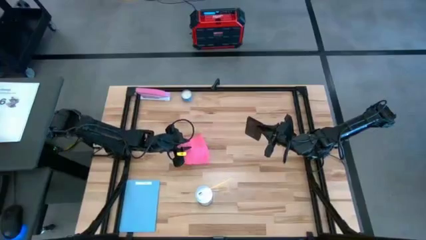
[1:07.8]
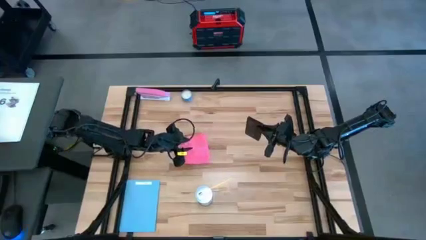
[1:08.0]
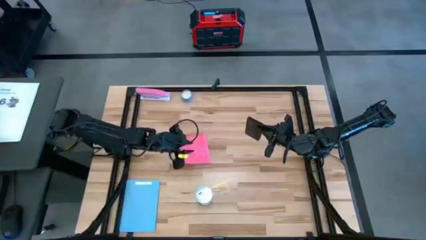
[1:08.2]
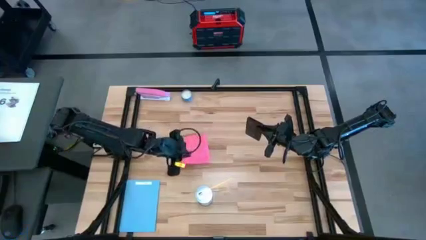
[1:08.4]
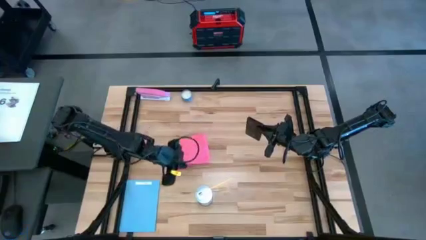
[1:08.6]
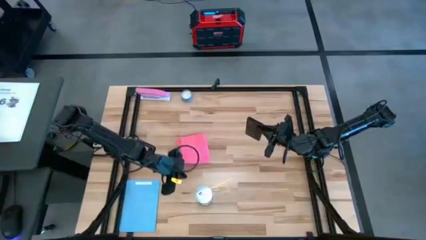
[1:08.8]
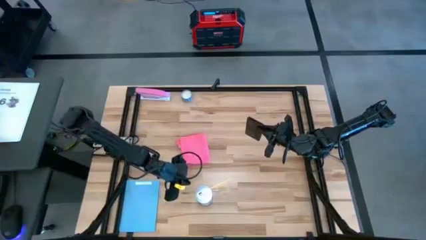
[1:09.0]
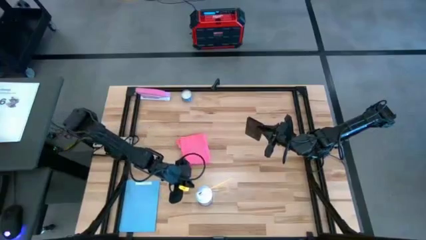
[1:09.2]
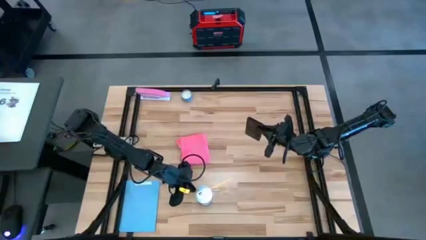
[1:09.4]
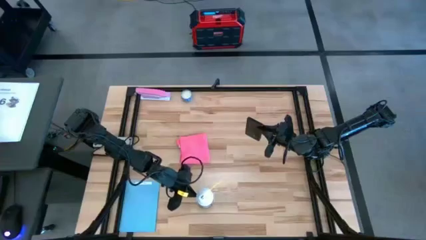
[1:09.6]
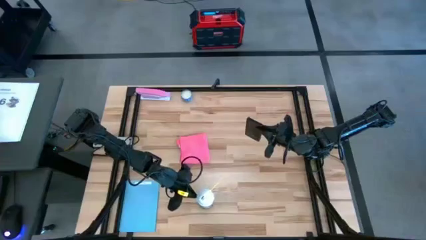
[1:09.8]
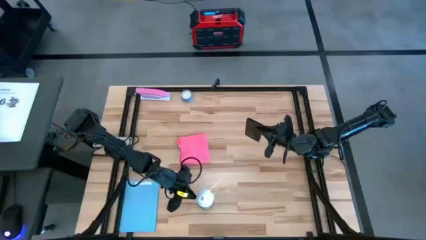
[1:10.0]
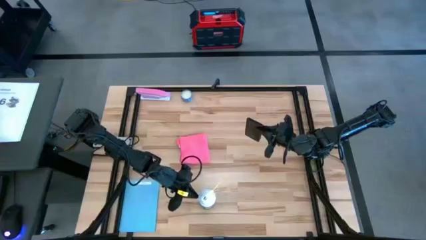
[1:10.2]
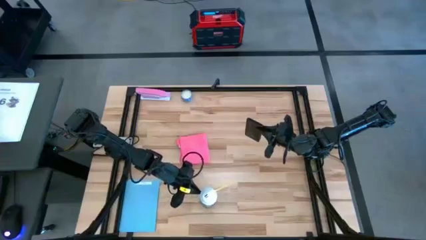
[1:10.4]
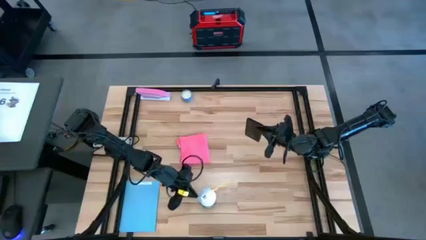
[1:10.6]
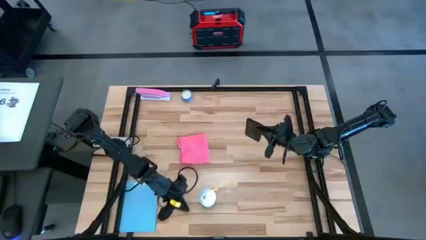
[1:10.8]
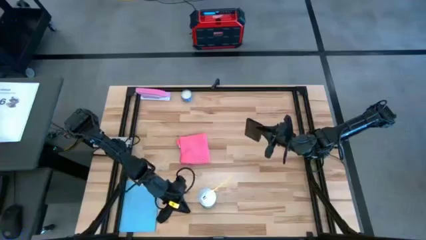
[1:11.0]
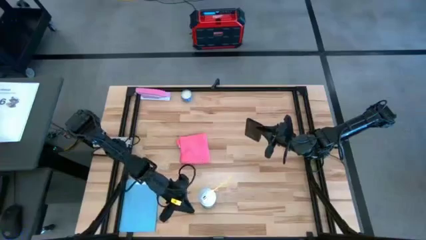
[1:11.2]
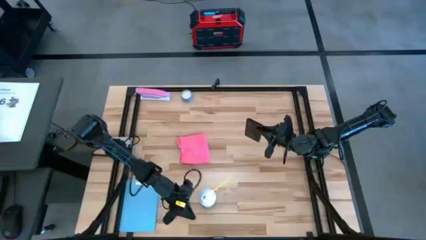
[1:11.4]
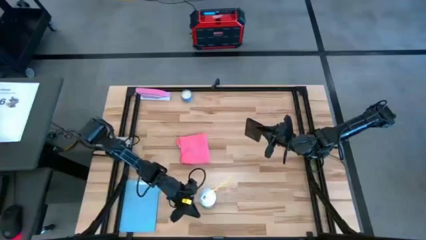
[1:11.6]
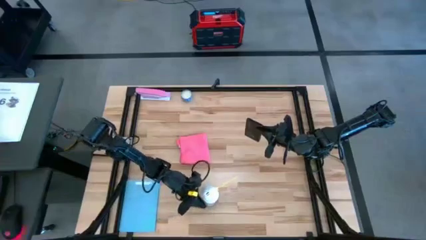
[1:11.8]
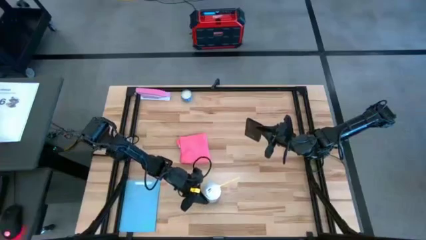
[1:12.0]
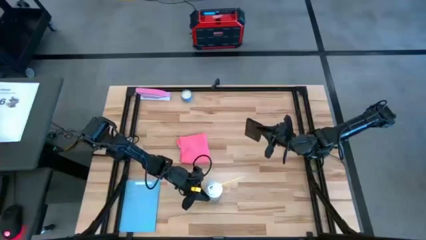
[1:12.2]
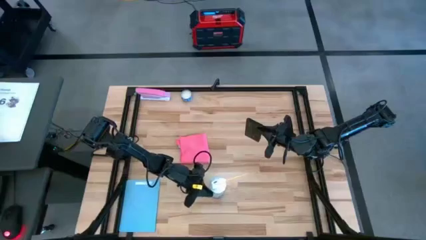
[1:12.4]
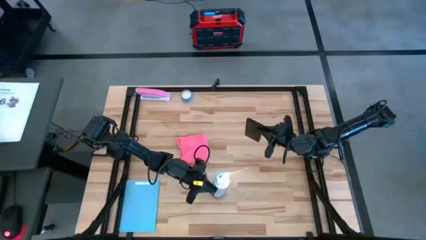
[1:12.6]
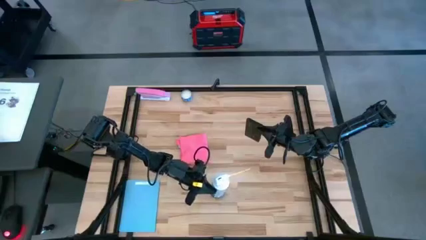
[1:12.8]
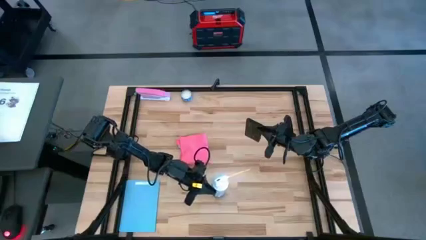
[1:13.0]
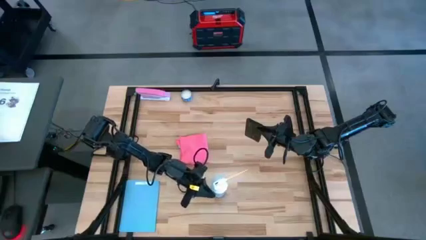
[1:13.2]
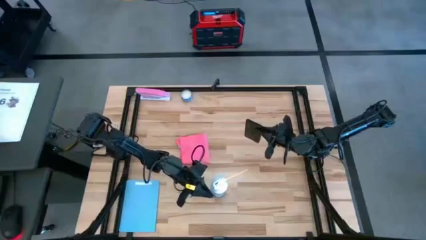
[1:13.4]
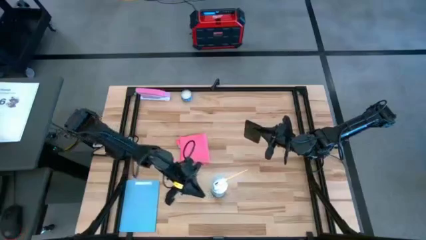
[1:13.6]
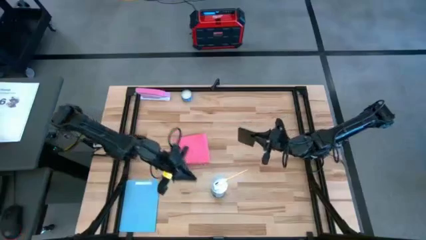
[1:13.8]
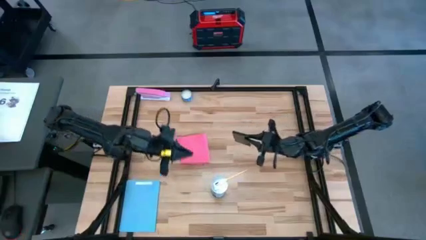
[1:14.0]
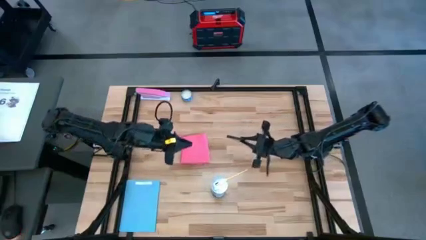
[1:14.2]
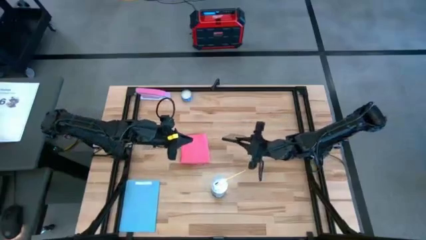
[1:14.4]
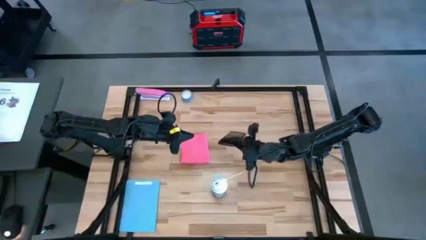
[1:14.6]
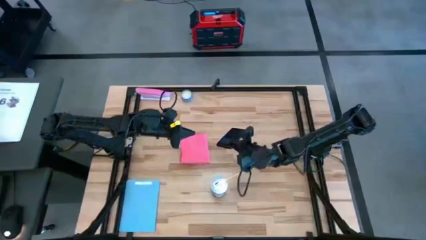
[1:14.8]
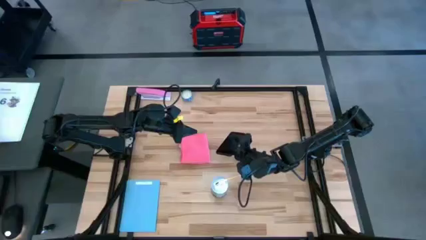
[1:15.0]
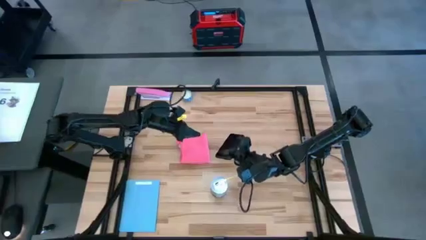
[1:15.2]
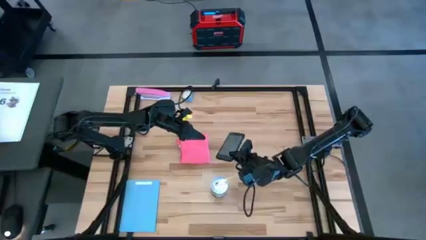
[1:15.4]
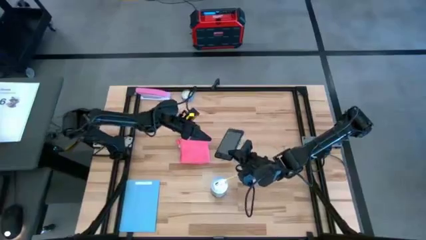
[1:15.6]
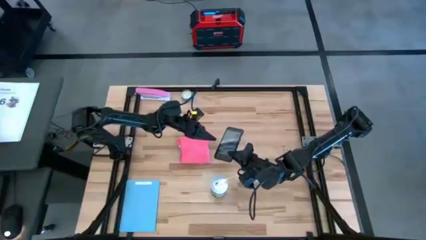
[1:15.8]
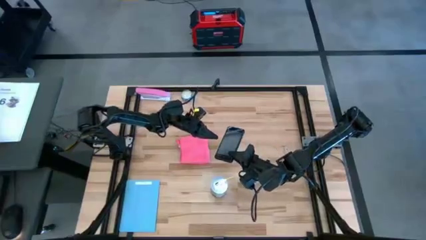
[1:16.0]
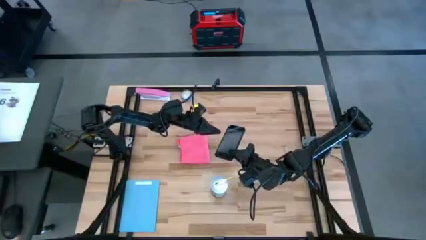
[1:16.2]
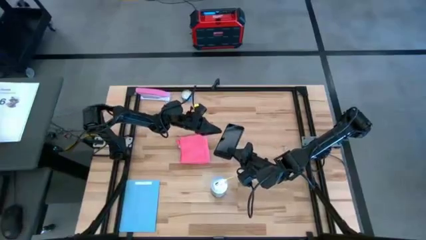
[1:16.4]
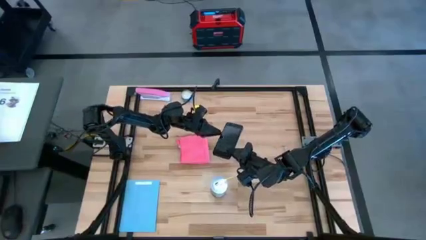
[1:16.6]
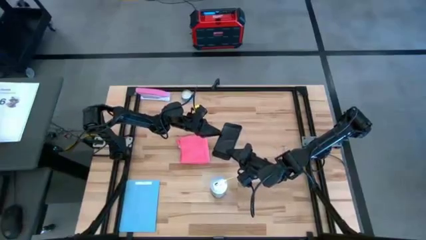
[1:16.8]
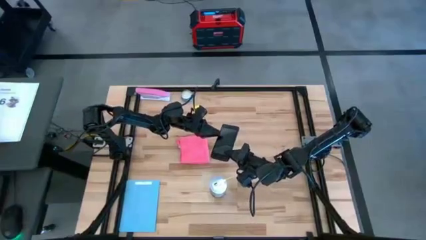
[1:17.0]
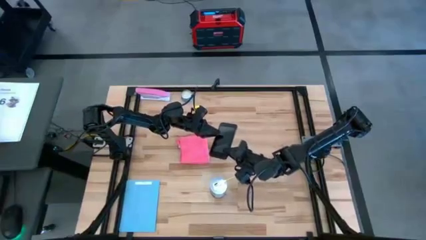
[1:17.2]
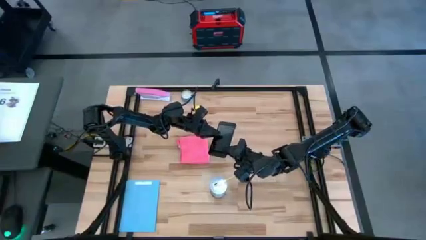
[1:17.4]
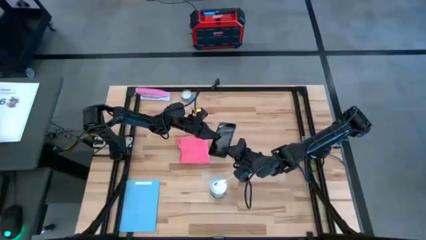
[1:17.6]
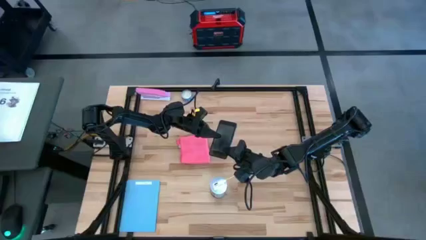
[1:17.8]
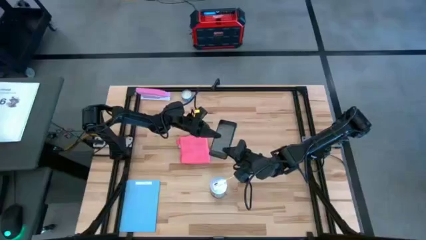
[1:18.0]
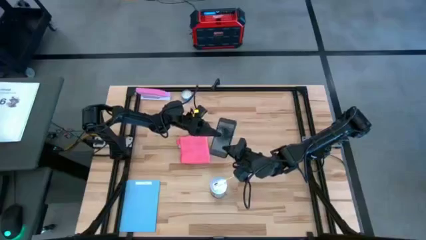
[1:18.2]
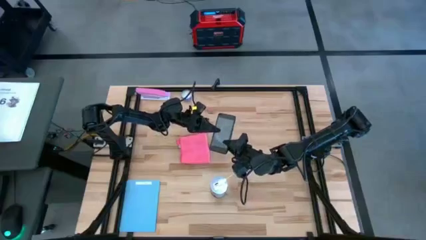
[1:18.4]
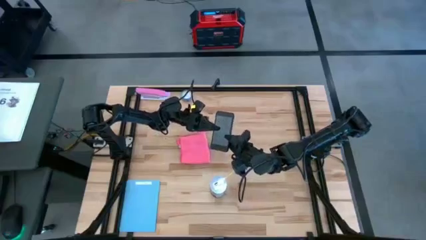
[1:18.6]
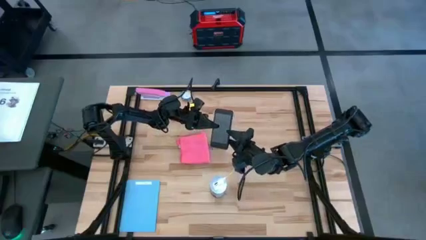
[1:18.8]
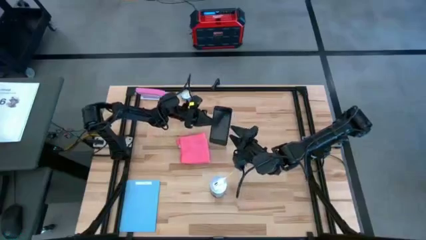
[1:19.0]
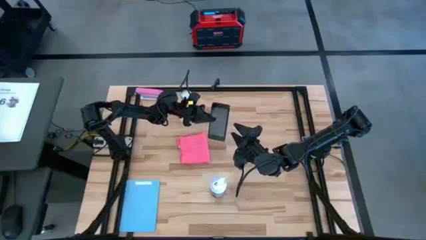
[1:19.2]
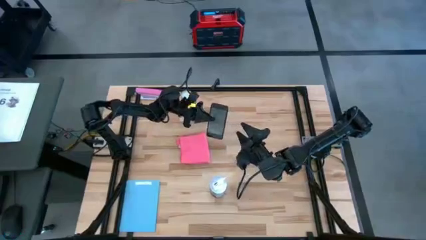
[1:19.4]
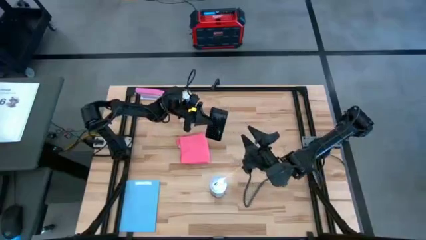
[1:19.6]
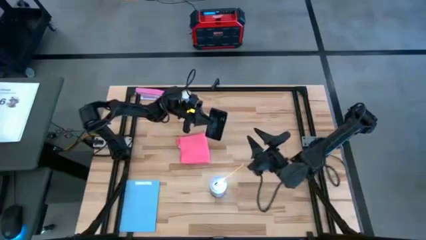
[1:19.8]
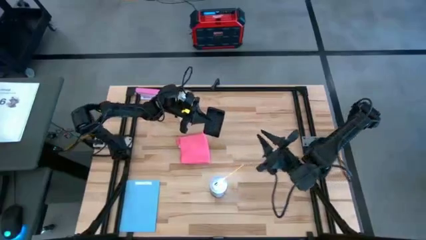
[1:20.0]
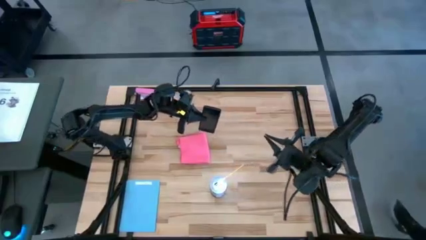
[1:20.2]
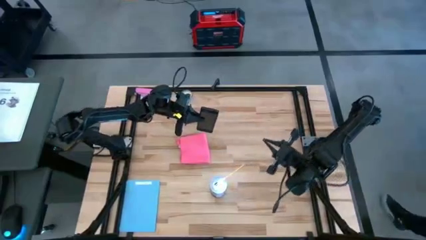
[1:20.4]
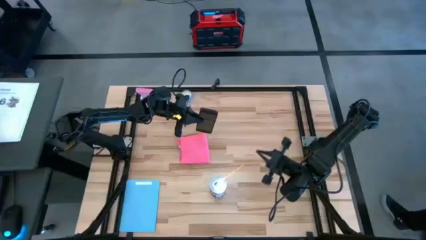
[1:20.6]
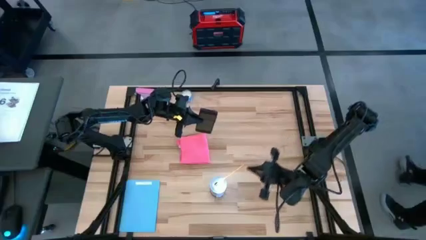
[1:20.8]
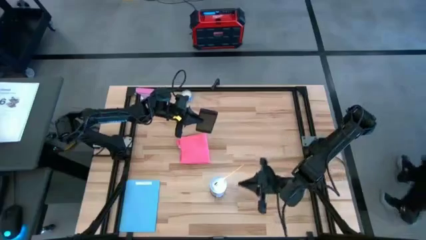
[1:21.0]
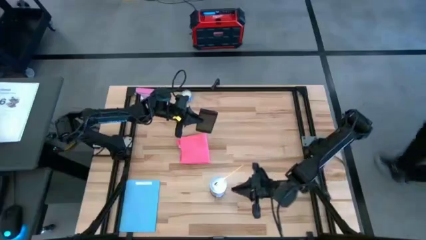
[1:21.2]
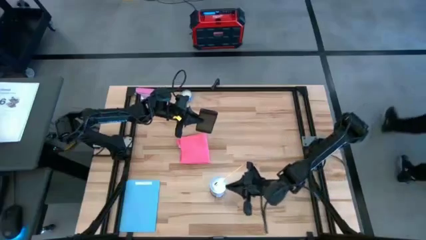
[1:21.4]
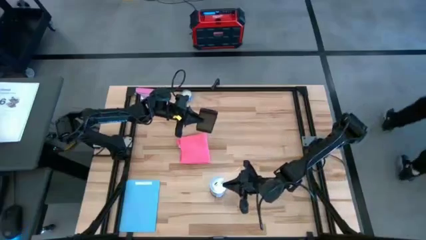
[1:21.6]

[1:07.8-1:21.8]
Task: Apply microfiber cloth
Spray the front of the black cellphone using the spray bottle
